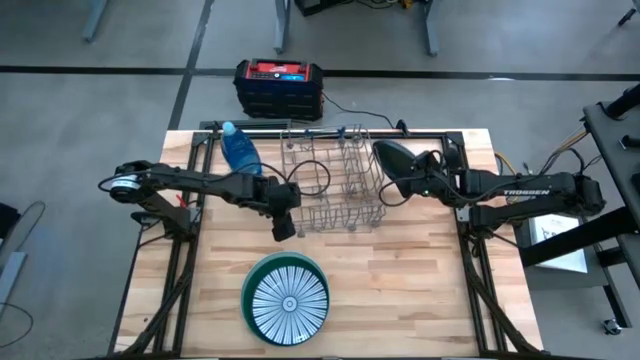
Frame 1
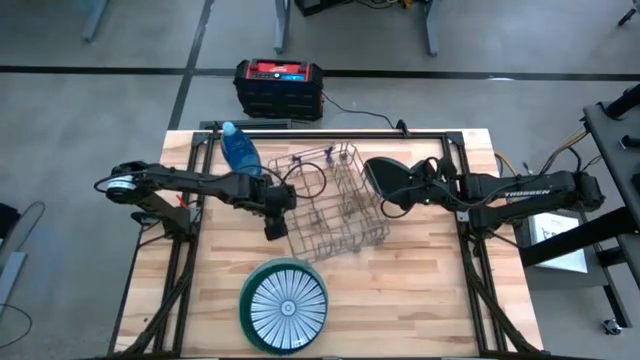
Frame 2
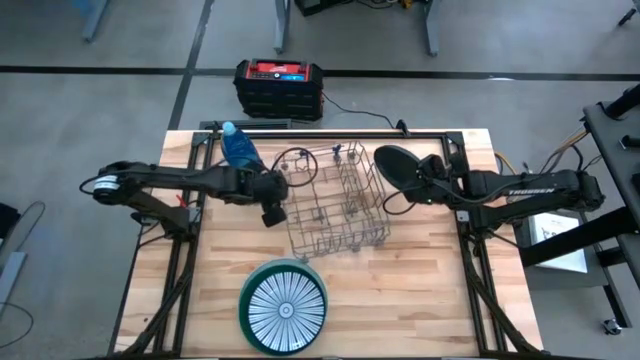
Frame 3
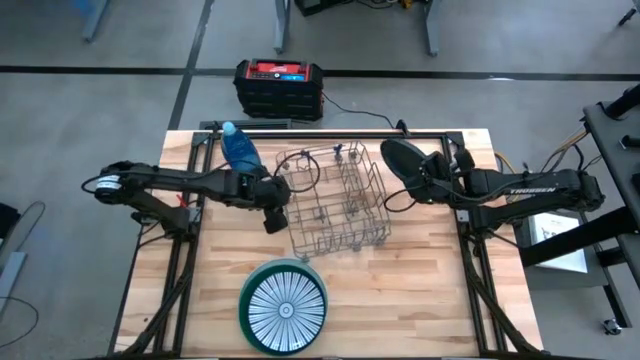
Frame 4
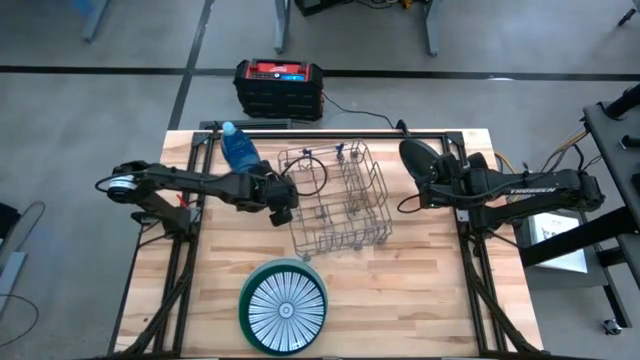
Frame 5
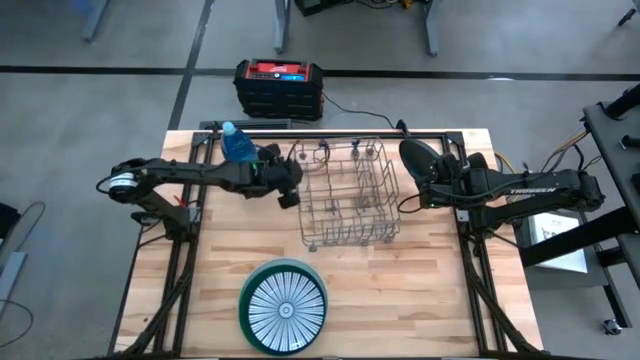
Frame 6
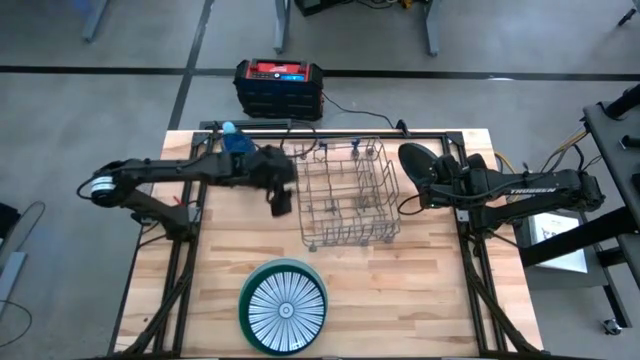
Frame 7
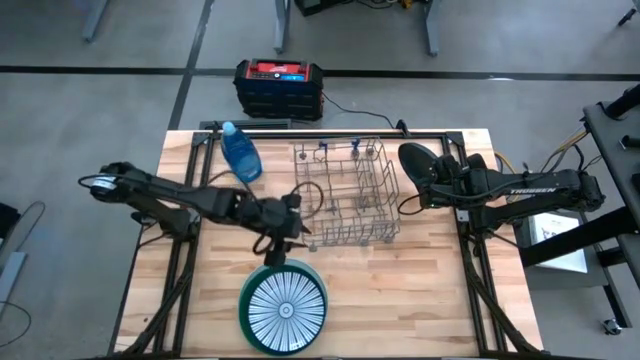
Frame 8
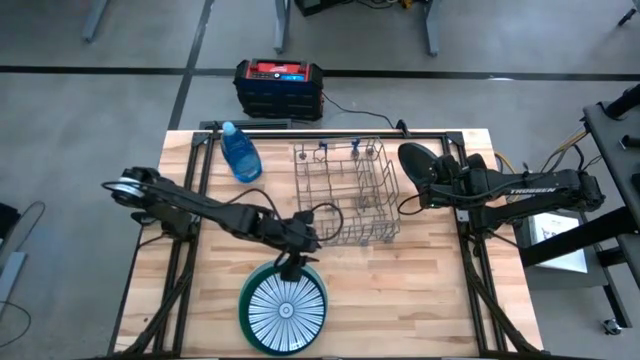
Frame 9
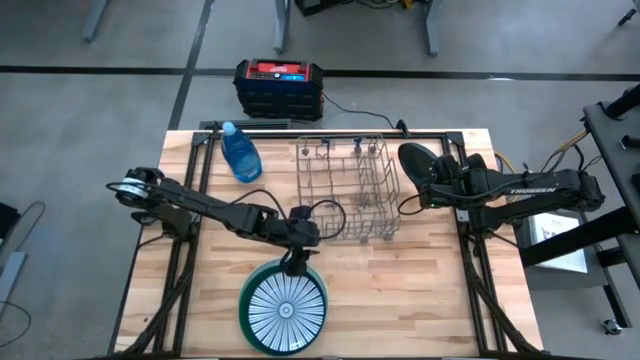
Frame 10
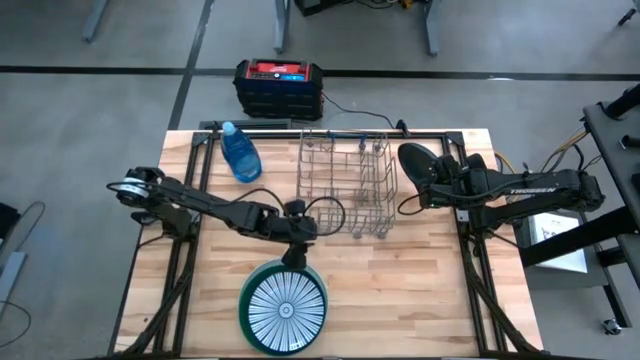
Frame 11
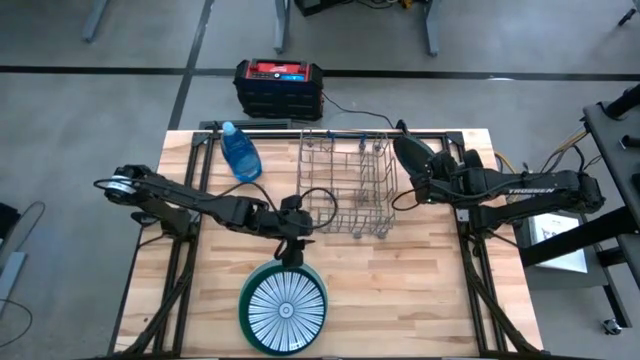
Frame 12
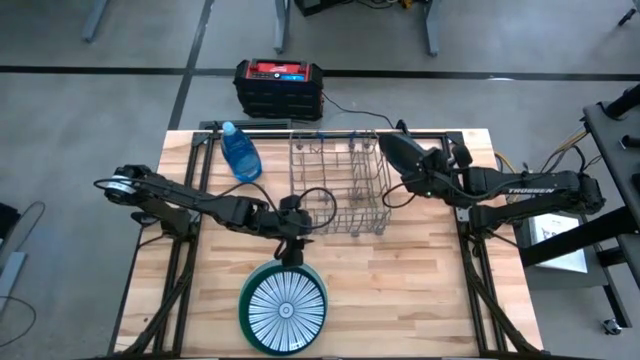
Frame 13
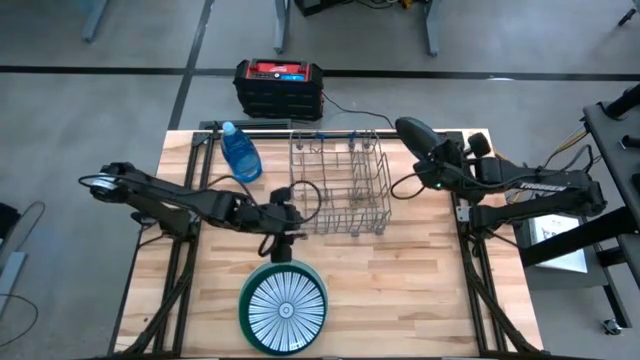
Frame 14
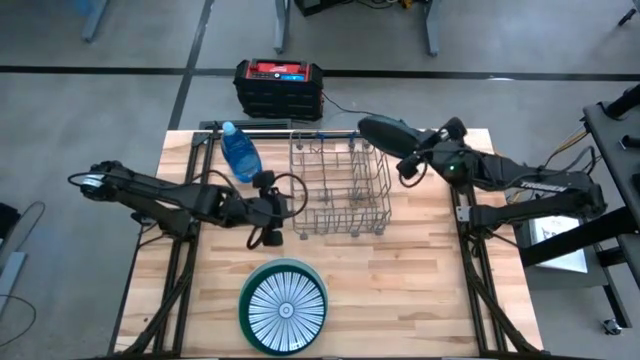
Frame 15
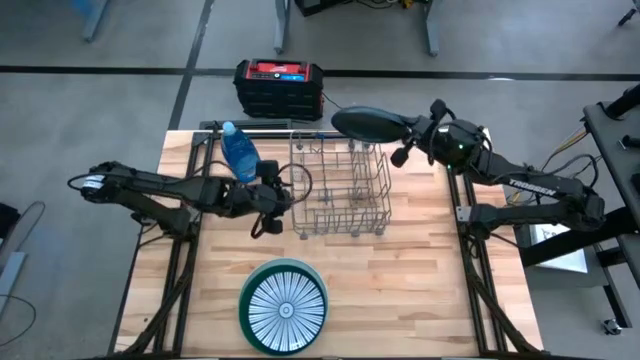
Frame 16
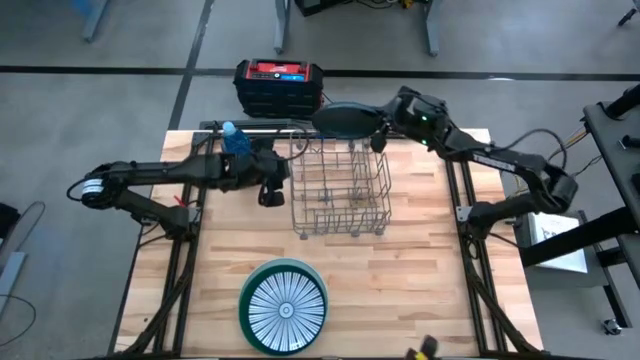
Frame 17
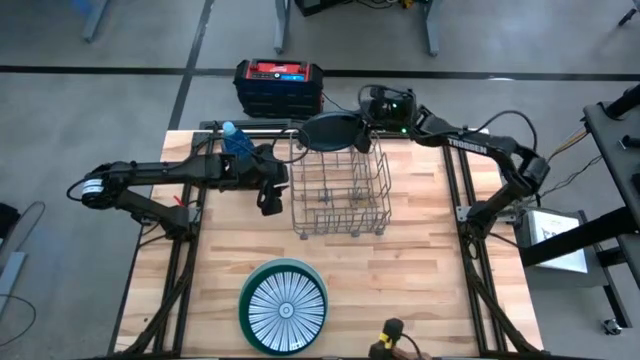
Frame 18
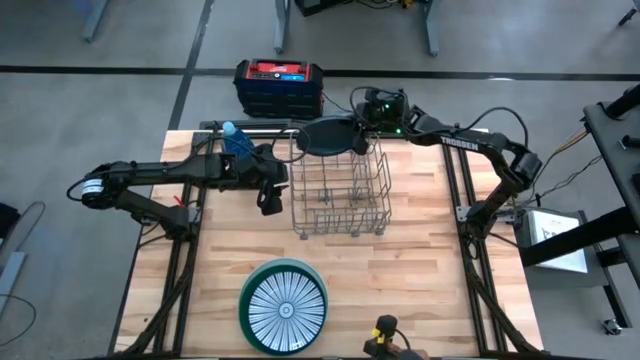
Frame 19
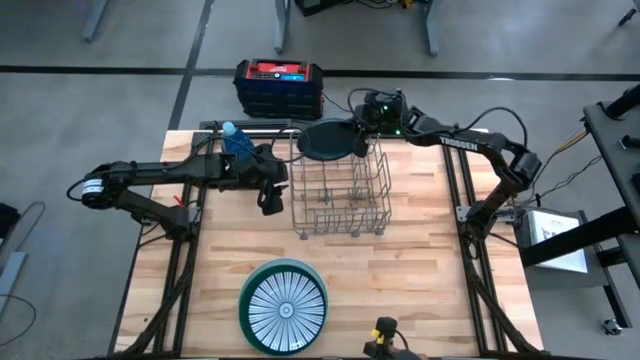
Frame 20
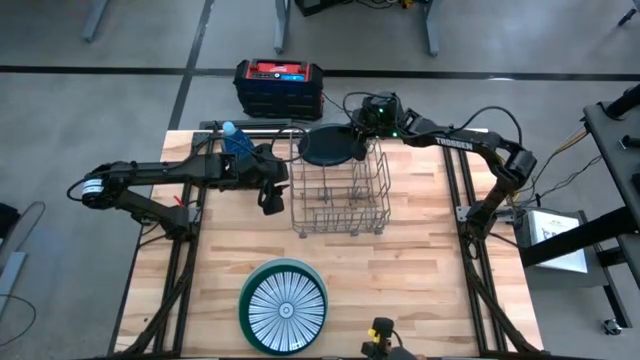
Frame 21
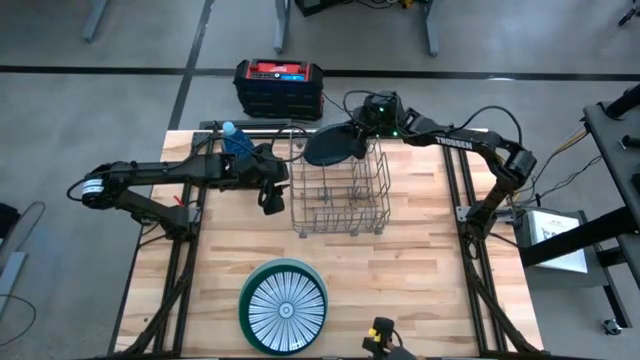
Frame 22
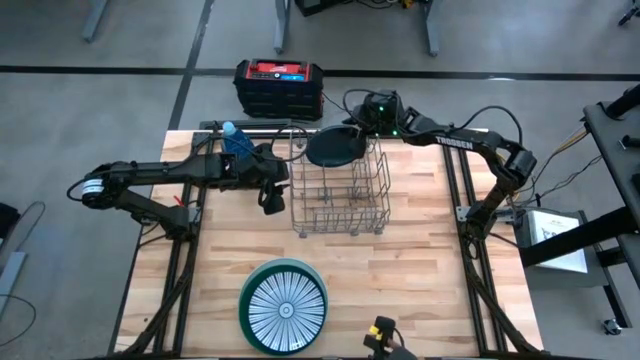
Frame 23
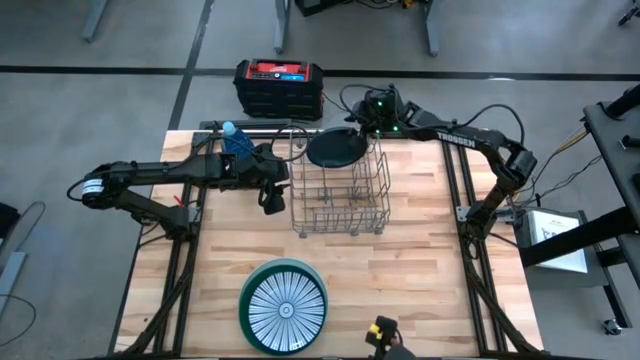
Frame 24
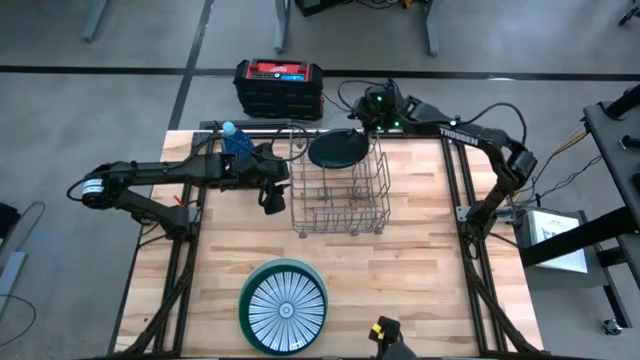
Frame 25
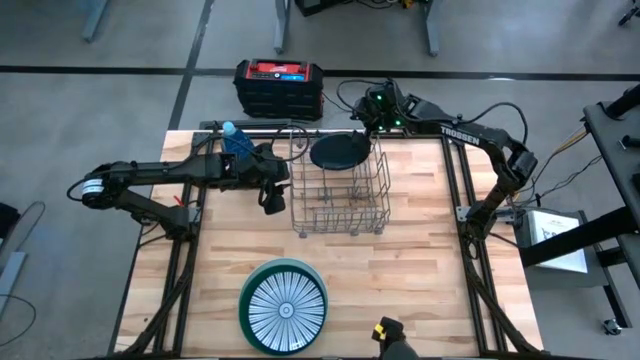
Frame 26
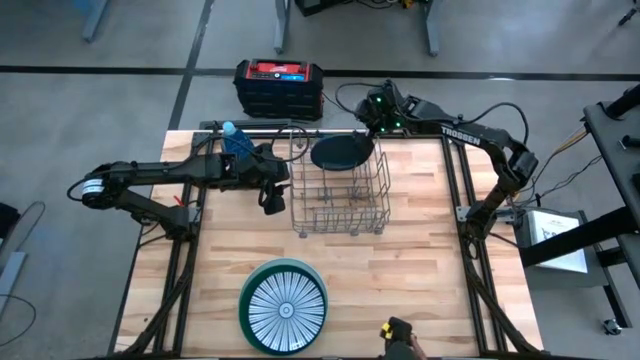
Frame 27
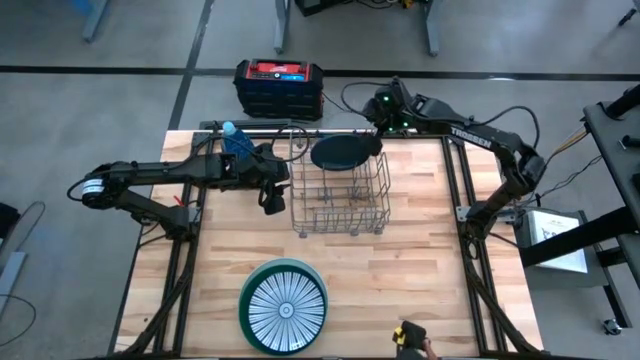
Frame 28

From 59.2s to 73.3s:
Task: Sort dishes
Put the blue plate into the gray dishwasher rack

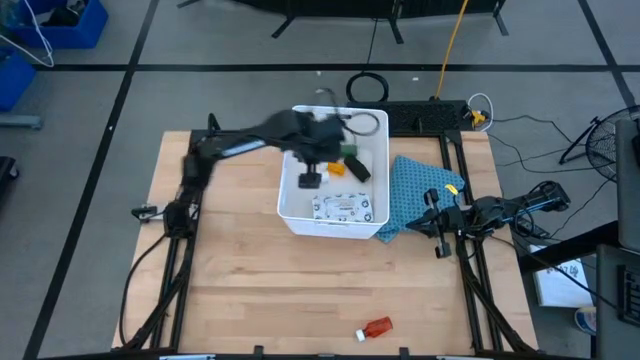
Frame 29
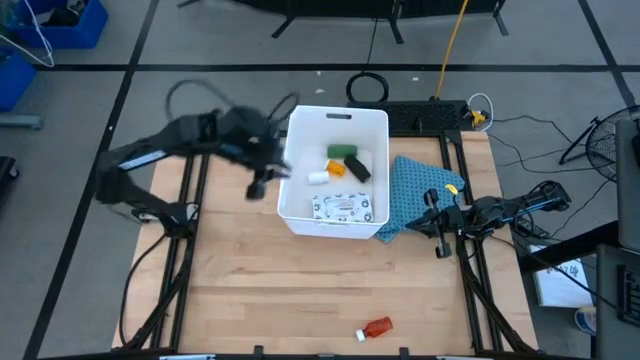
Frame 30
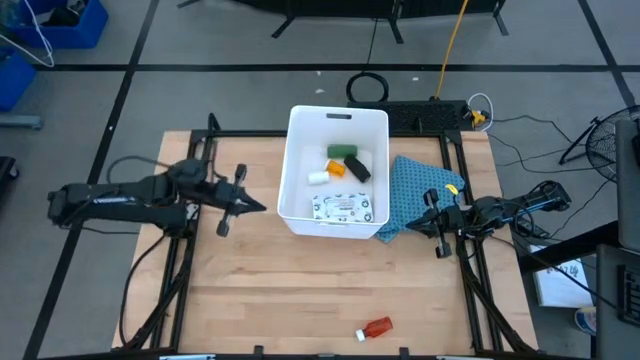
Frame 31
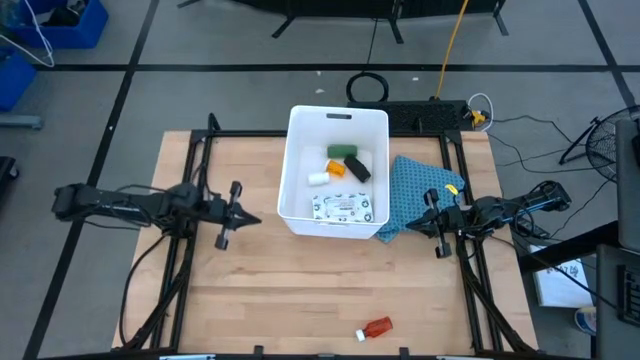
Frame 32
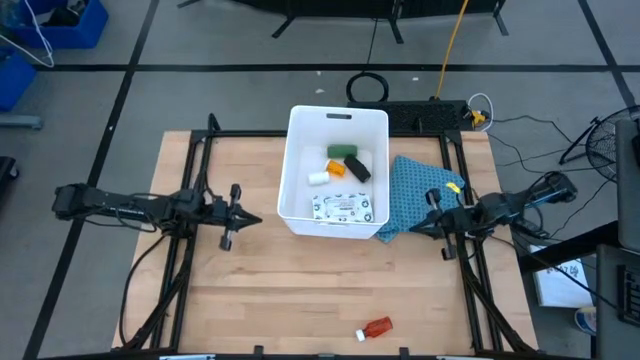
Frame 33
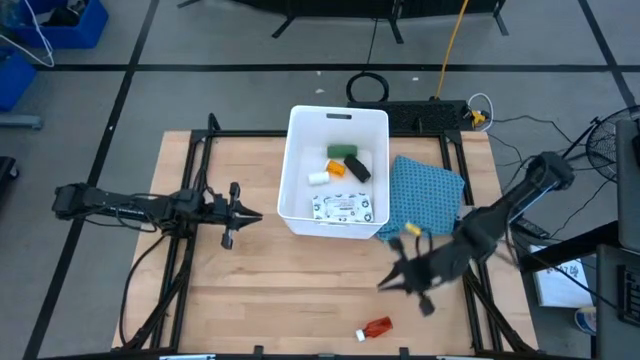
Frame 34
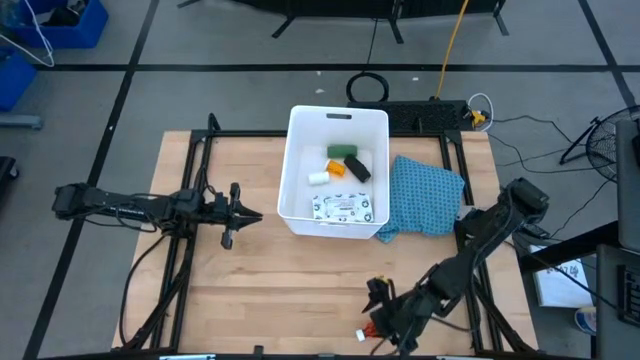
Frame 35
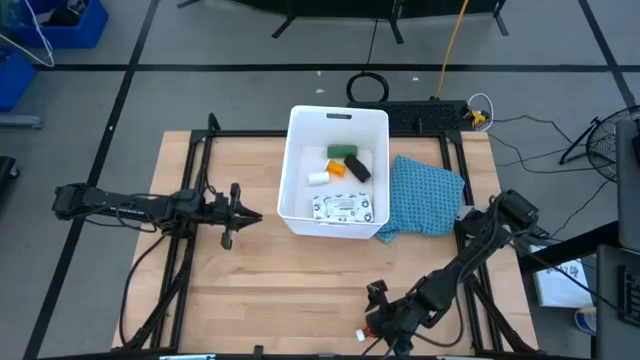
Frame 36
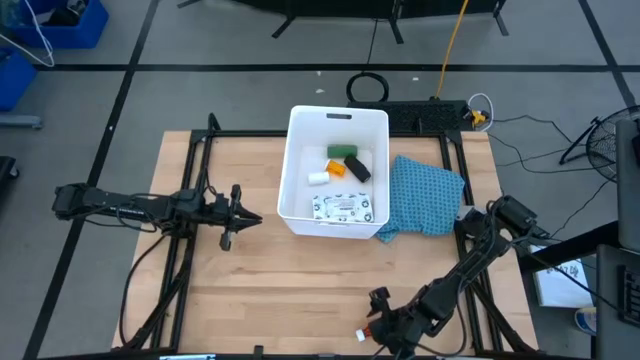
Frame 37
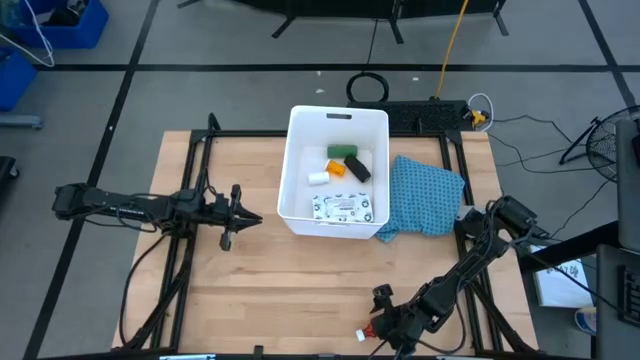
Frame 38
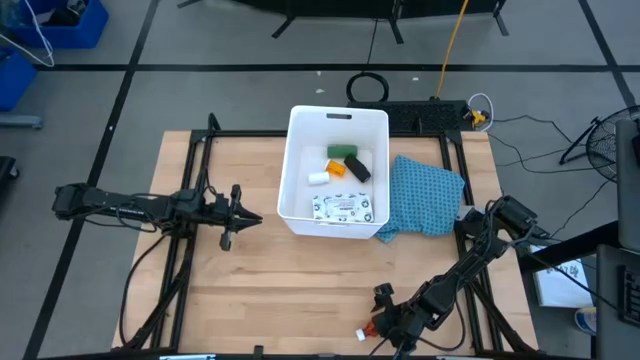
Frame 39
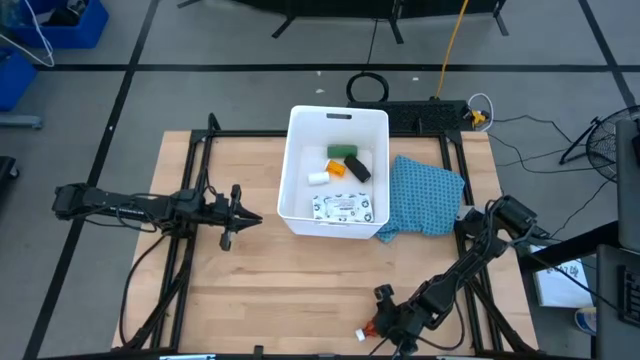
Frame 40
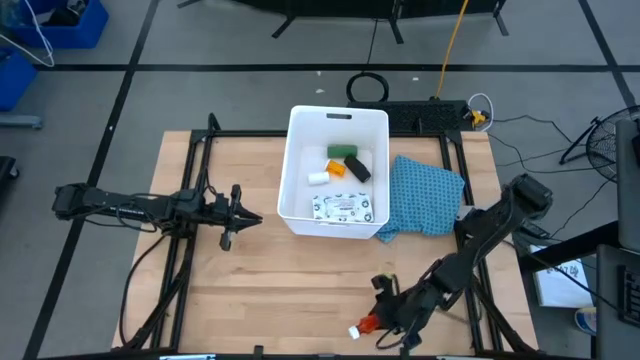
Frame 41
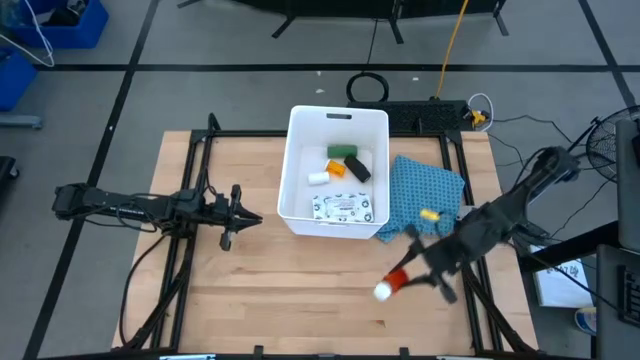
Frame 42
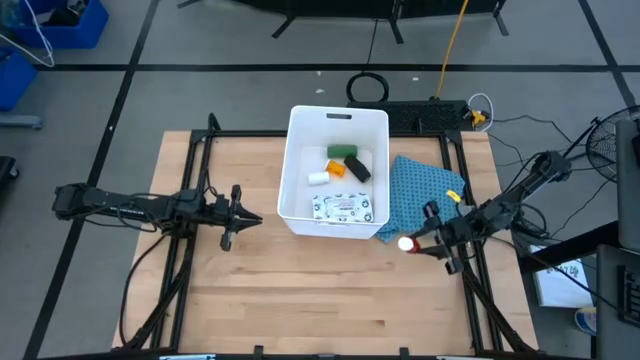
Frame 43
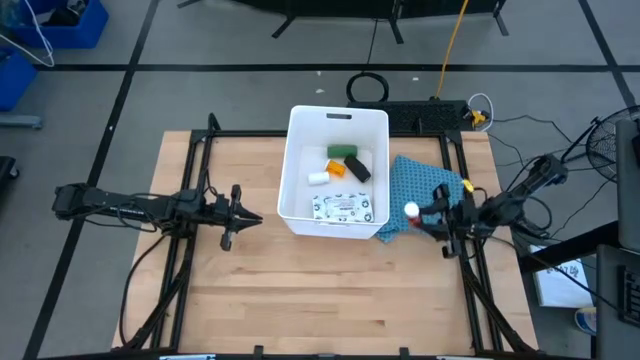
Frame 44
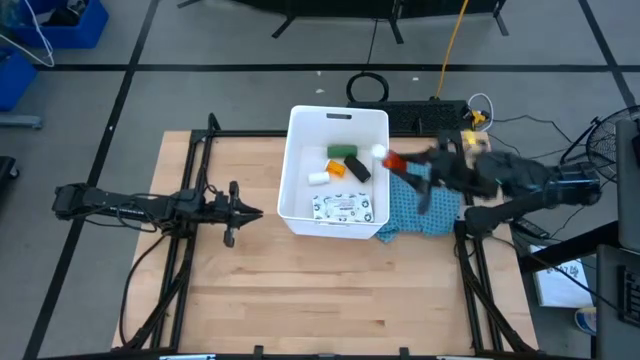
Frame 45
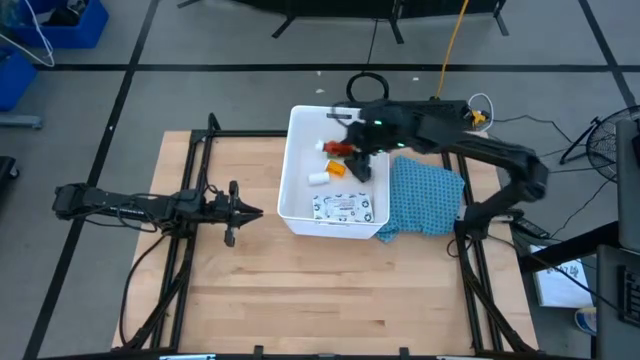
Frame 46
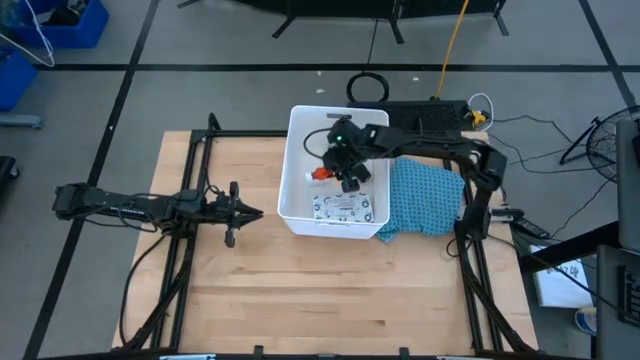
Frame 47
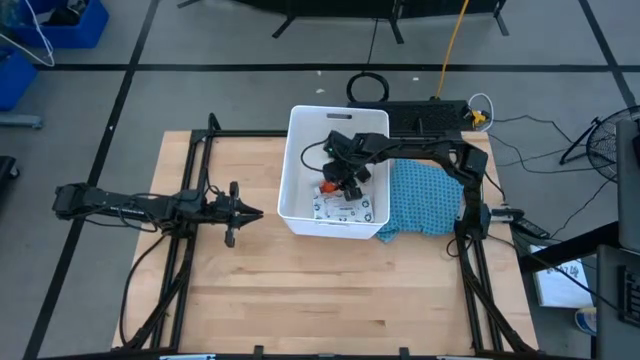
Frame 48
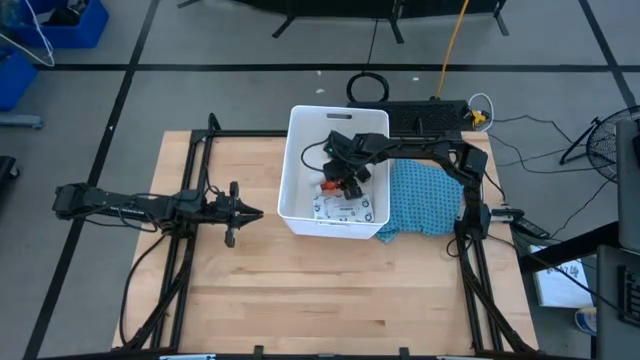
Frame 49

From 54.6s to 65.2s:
Task: Pick & place medical supplies in basket/bin
Put the red medicine bottle into the bin
